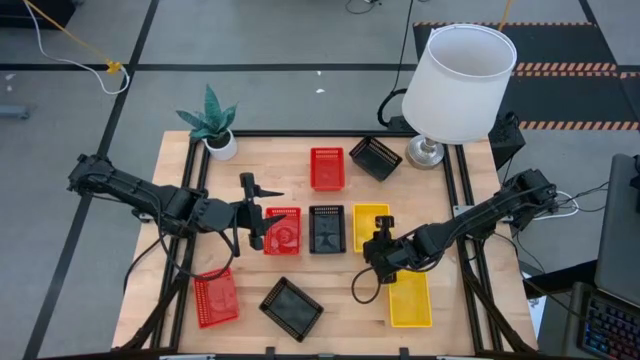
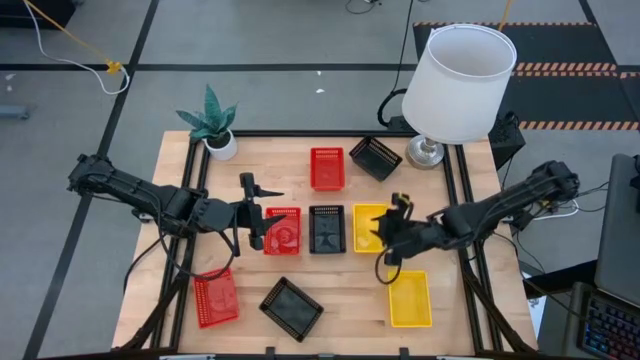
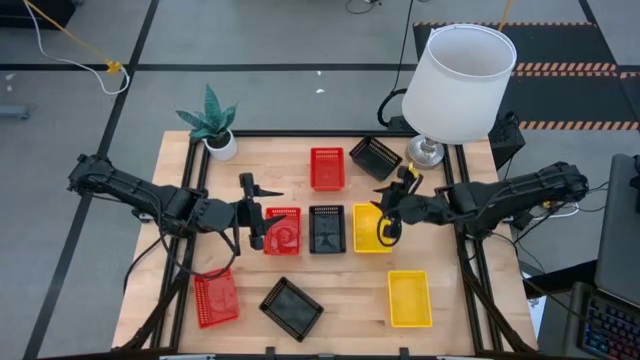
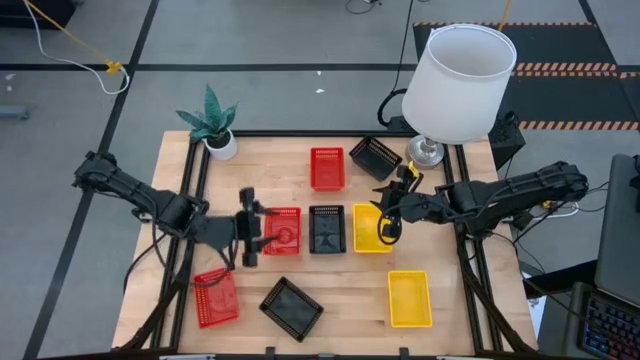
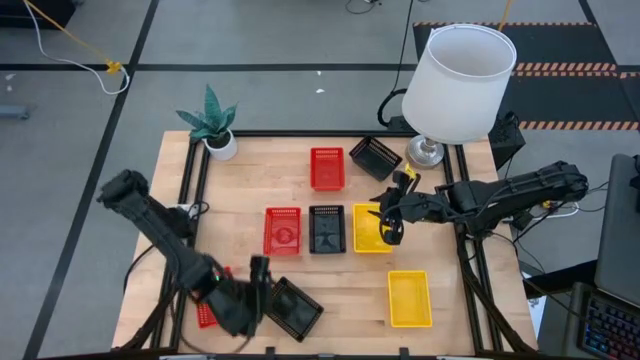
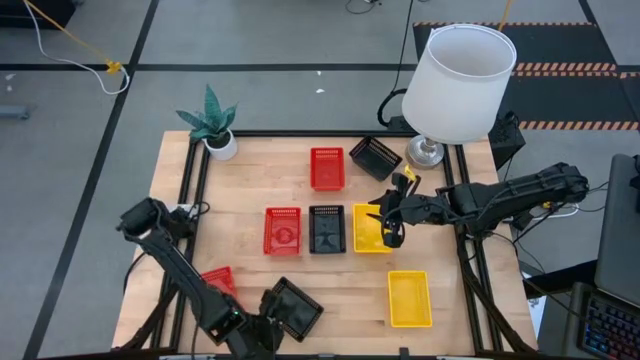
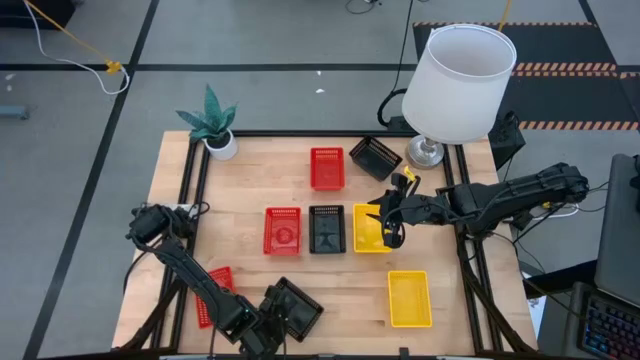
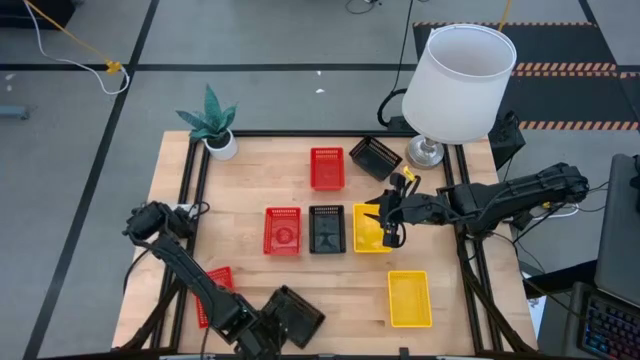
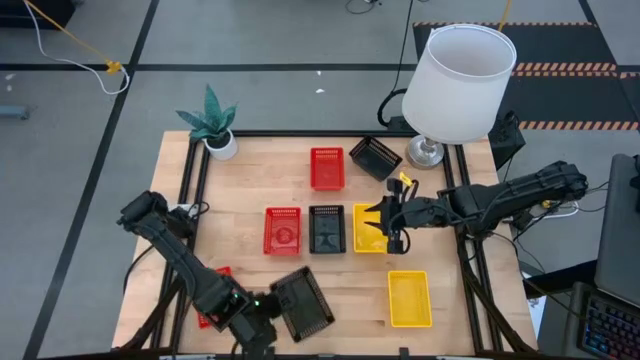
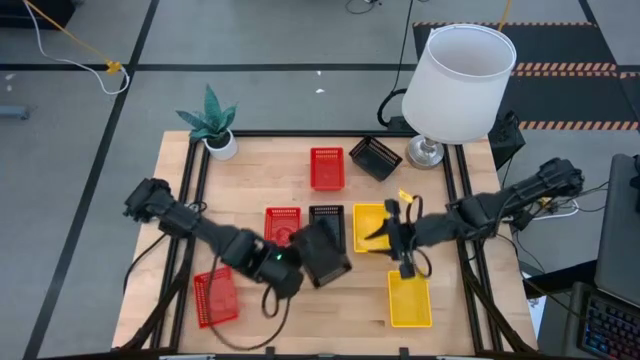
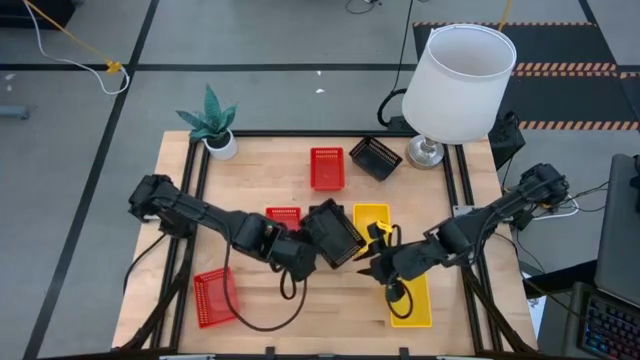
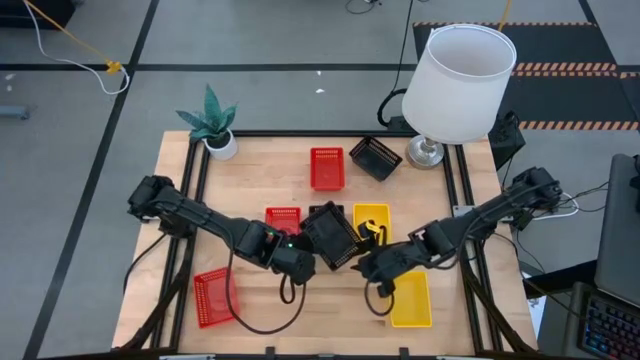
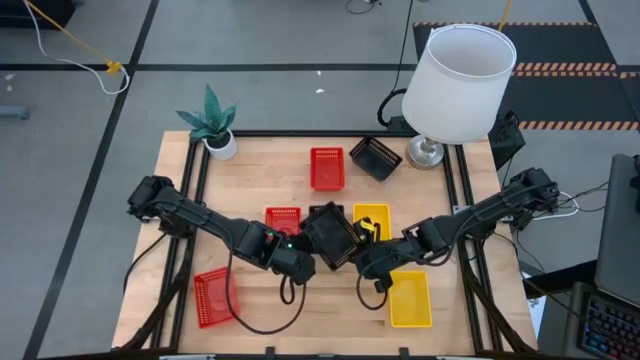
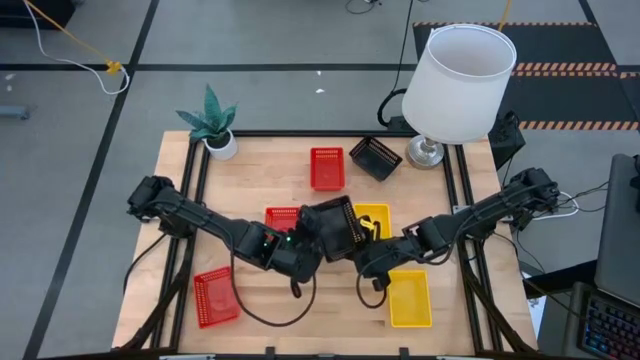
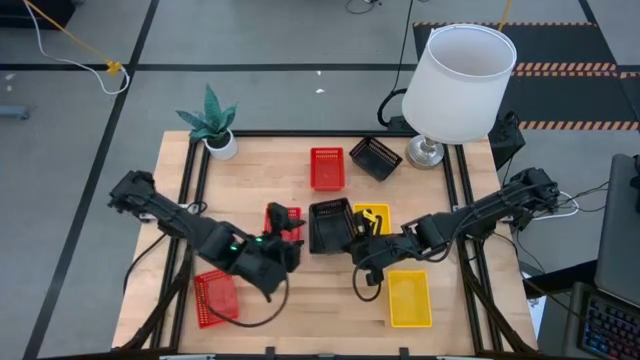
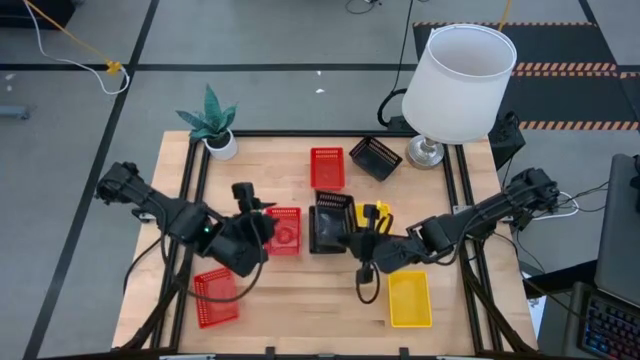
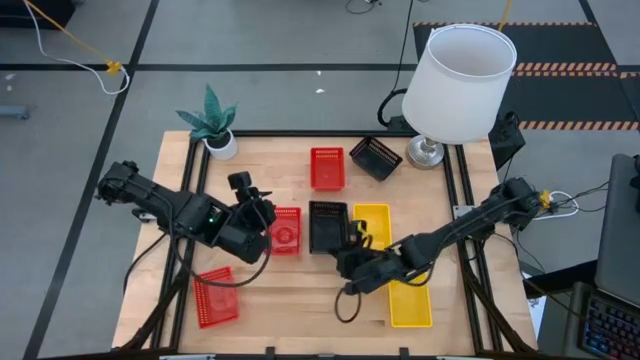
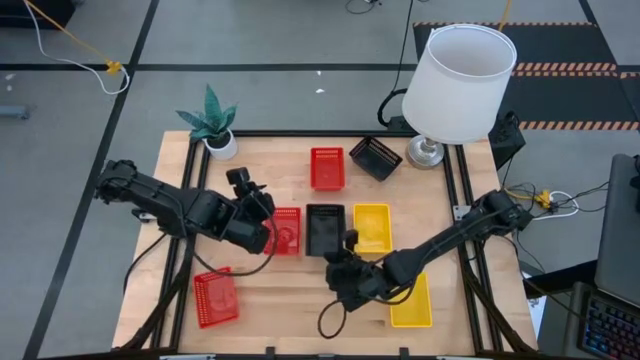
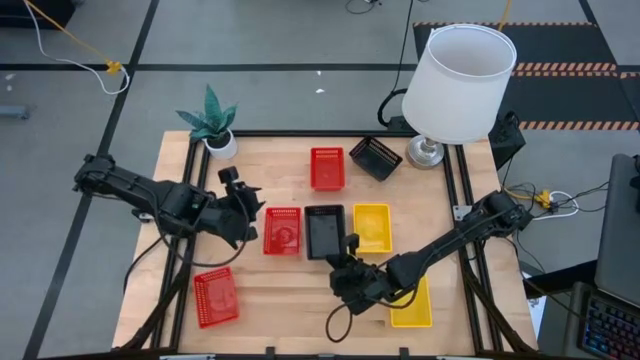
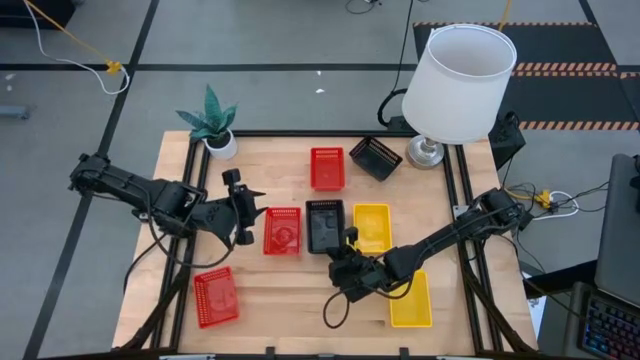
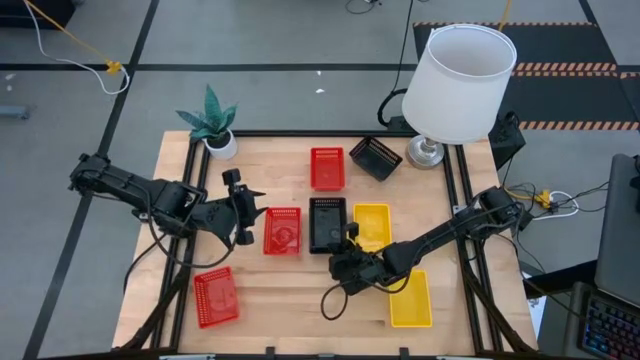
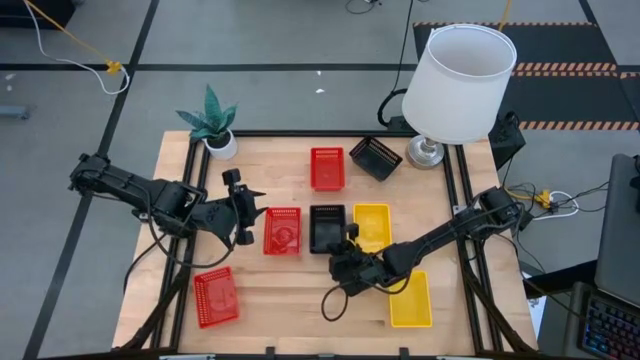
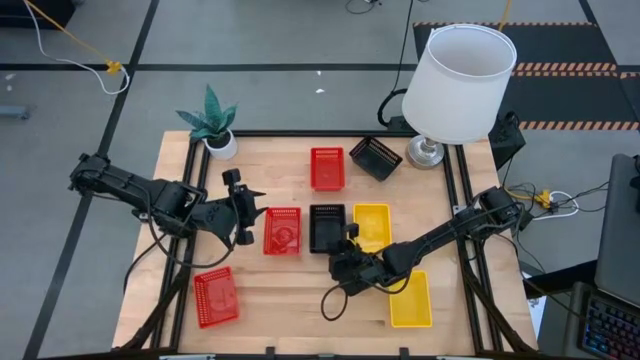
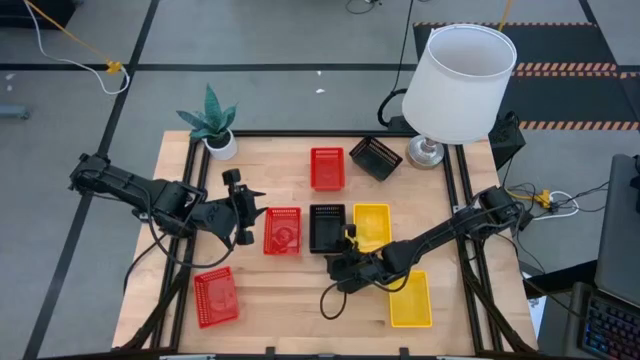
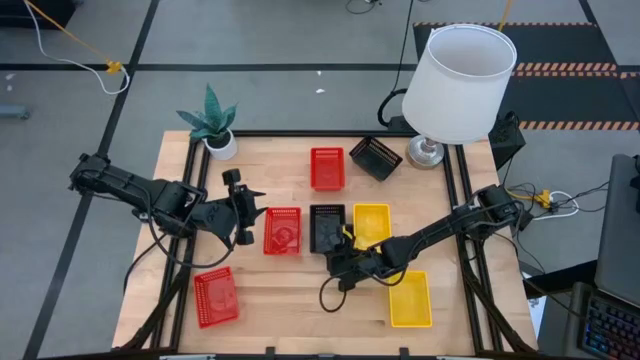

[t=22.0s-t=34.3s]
Stack the bottom black bin on top of the middle black bin

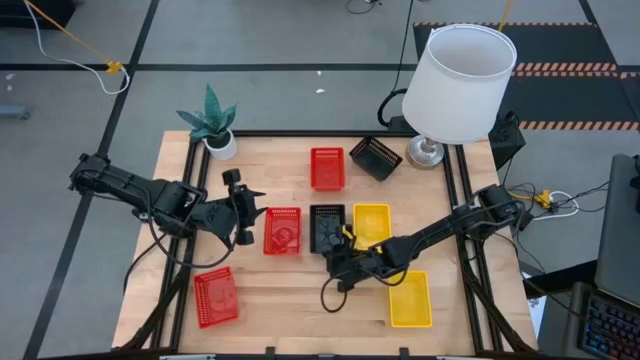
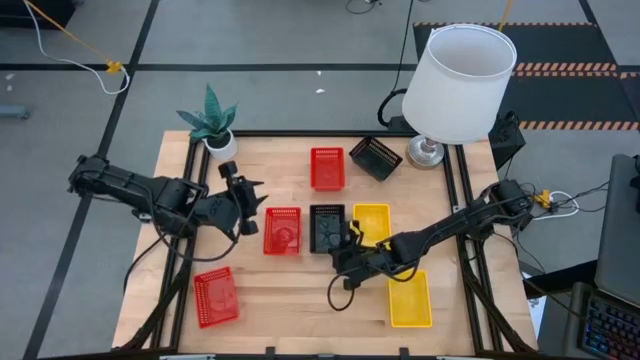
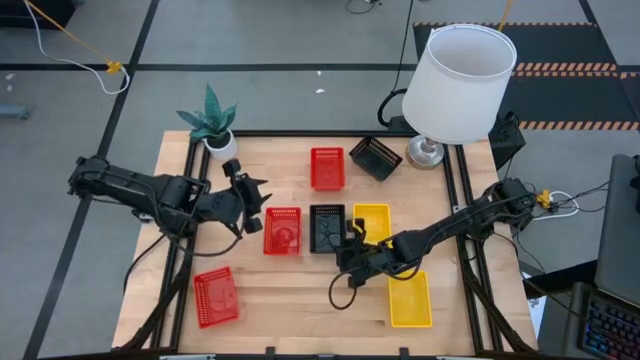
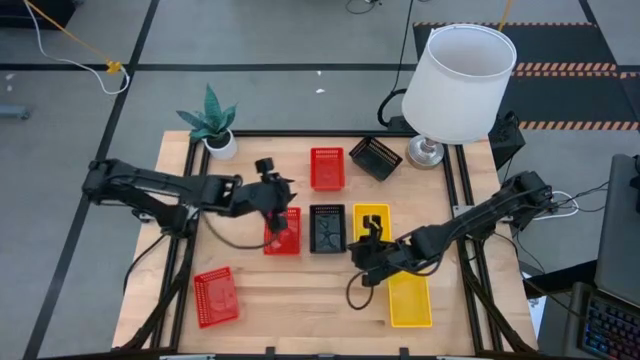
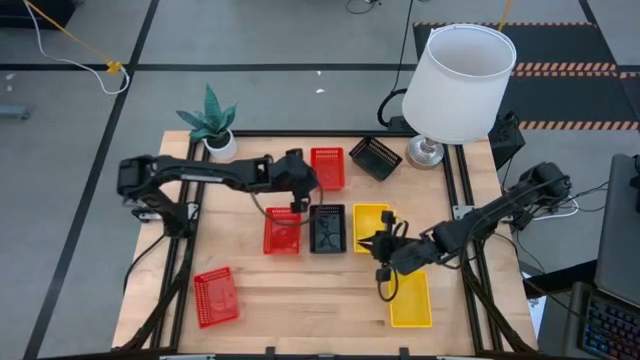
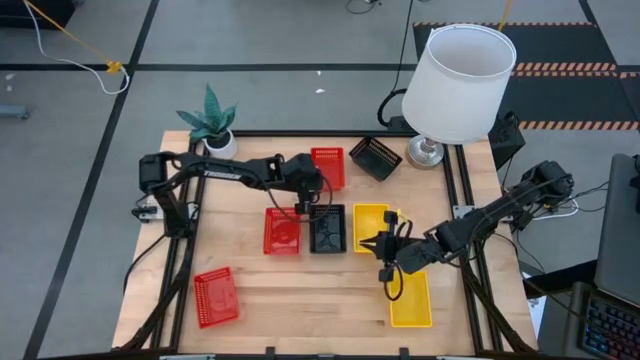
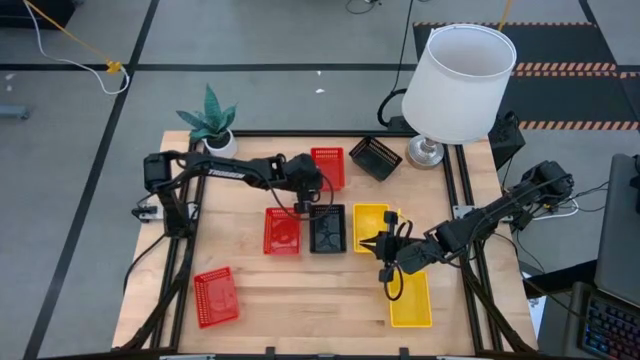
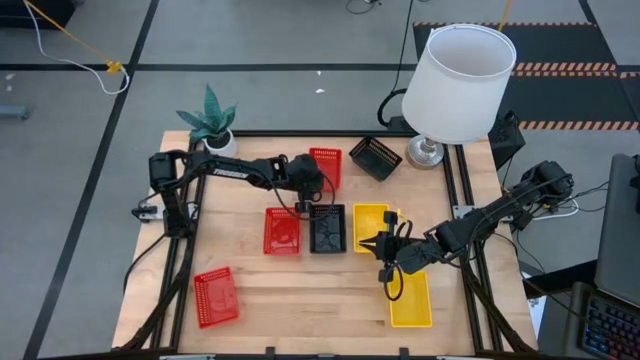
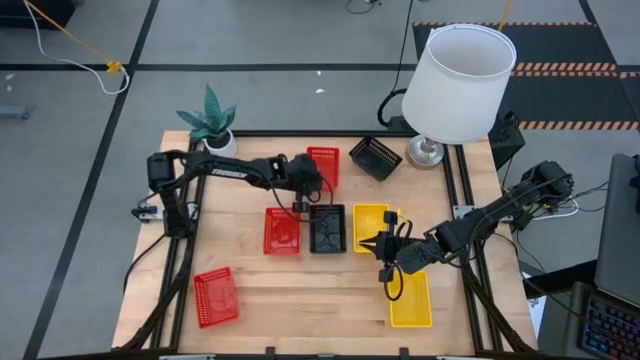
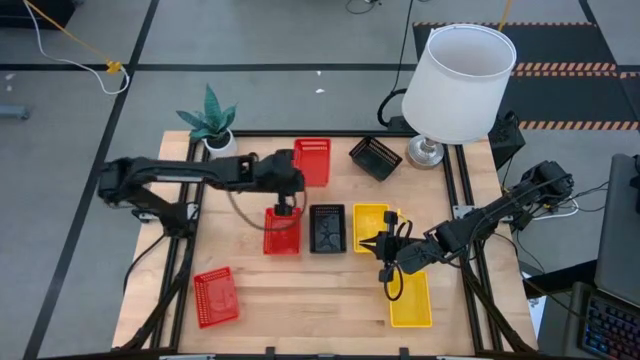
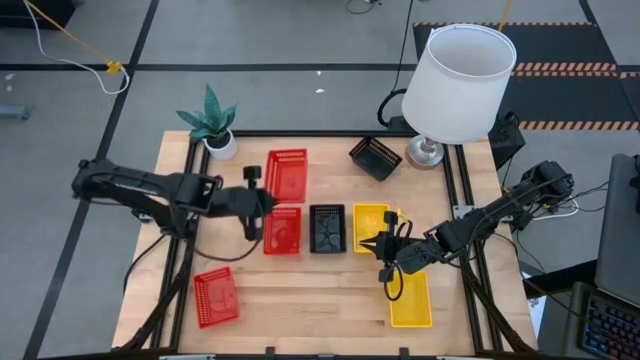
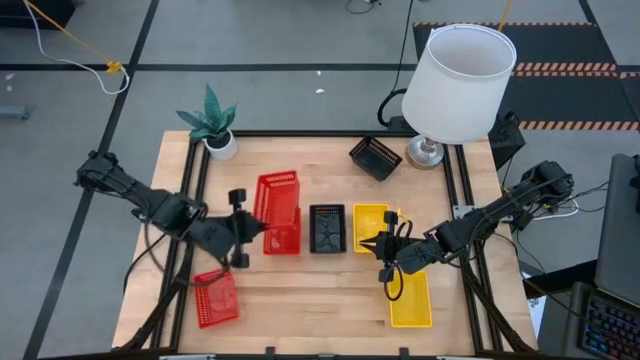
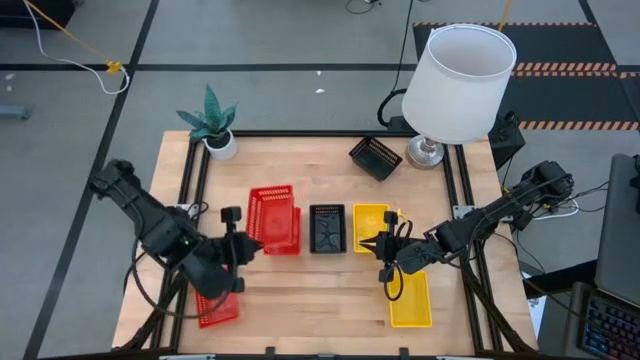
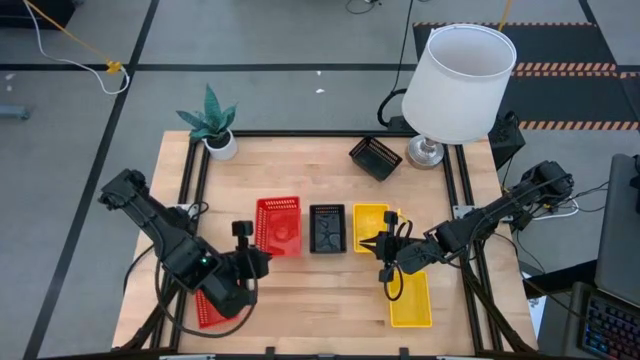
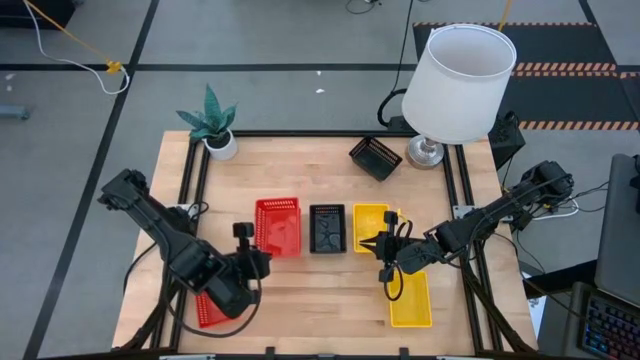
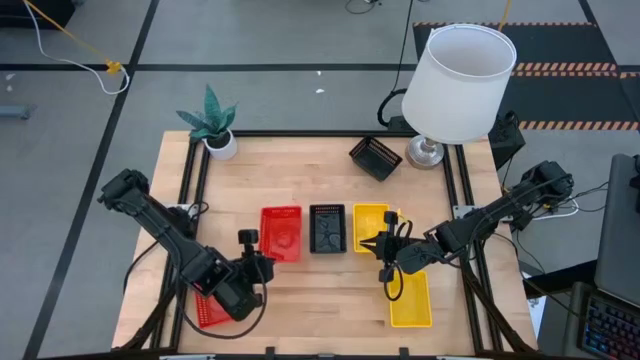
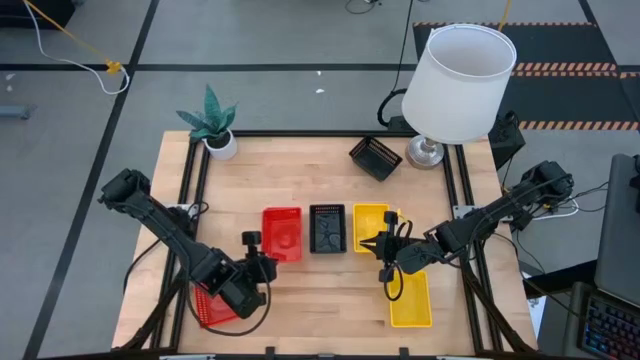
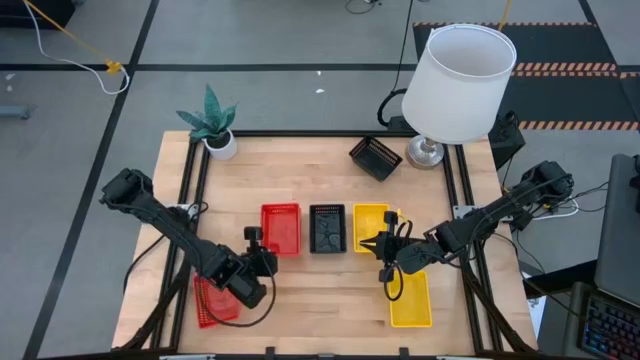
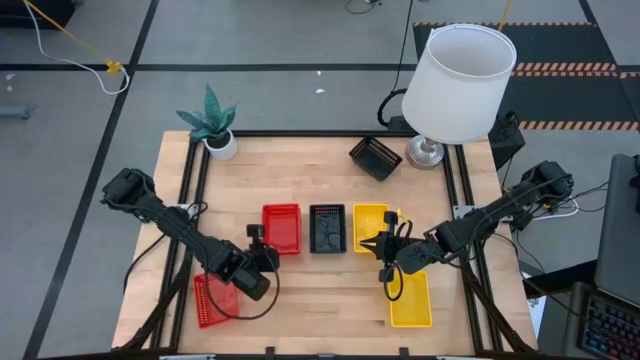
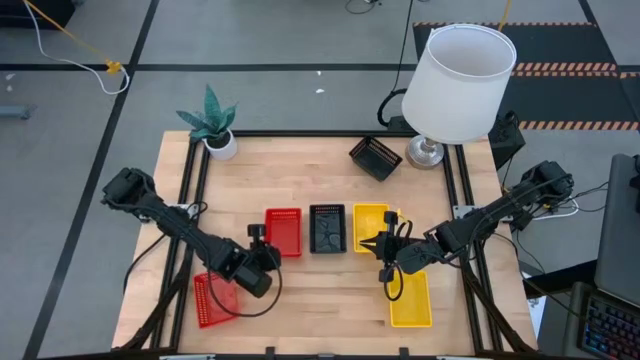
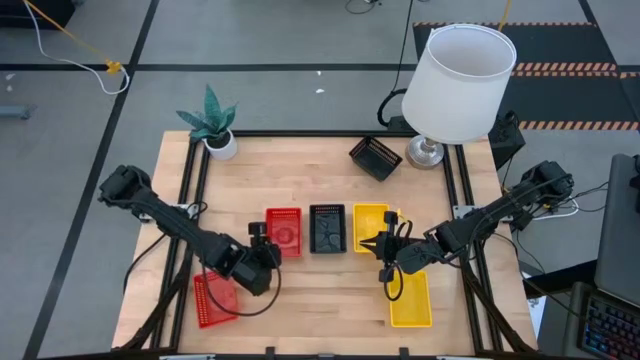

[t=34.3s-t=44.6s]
Stack the top red bin on top of the middle red bin
